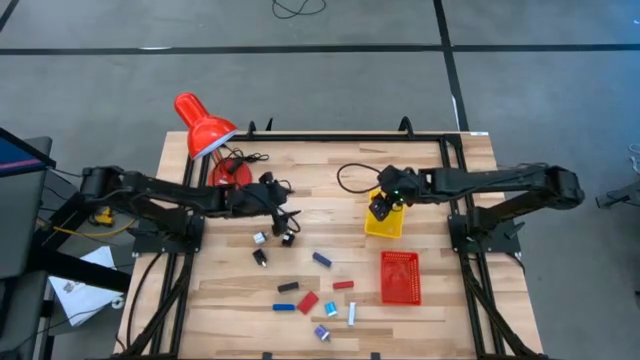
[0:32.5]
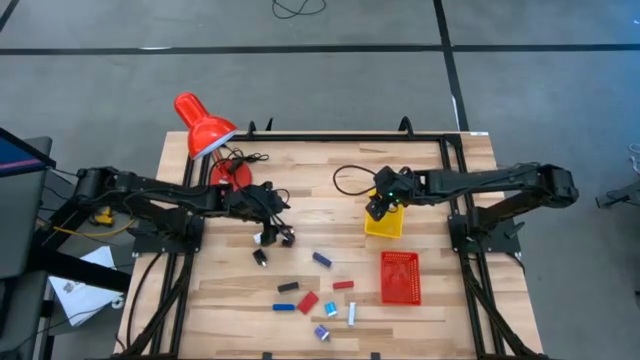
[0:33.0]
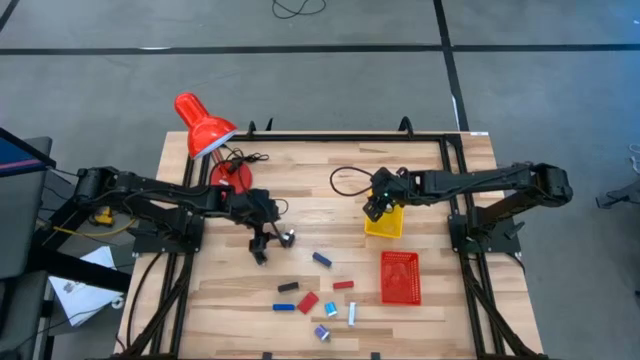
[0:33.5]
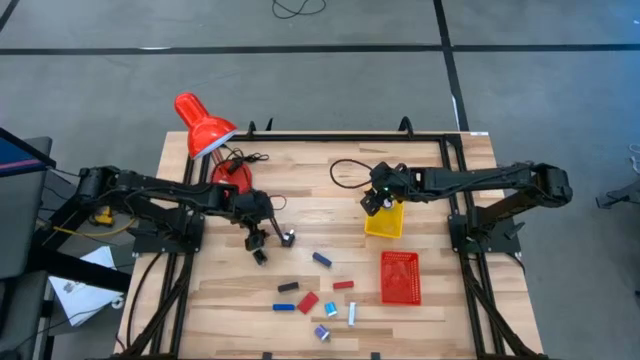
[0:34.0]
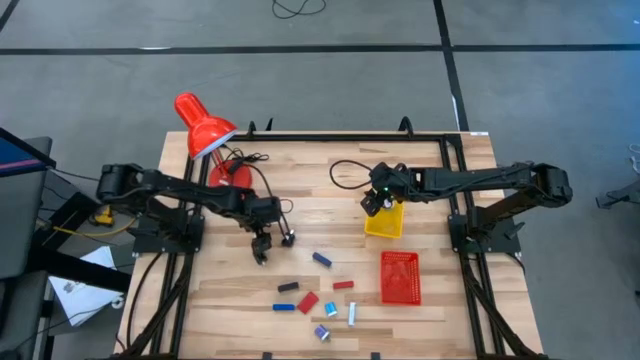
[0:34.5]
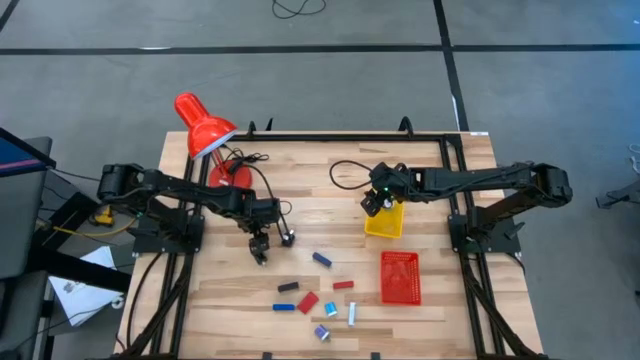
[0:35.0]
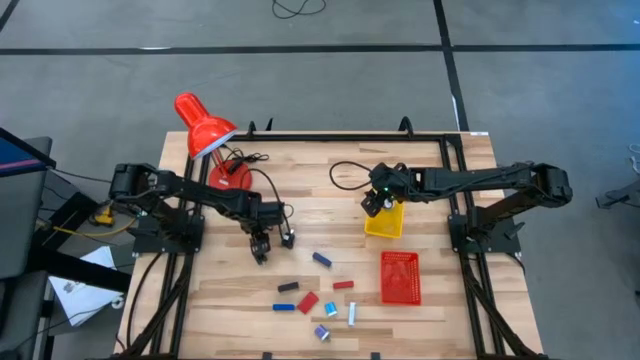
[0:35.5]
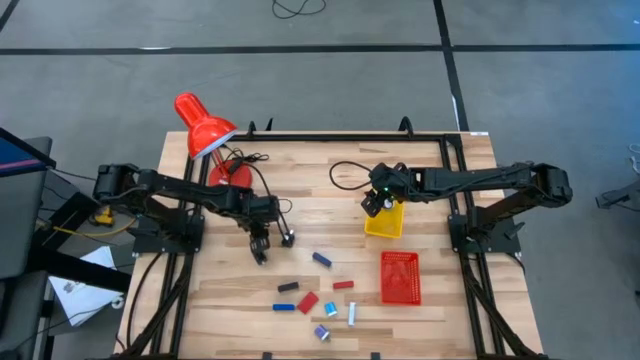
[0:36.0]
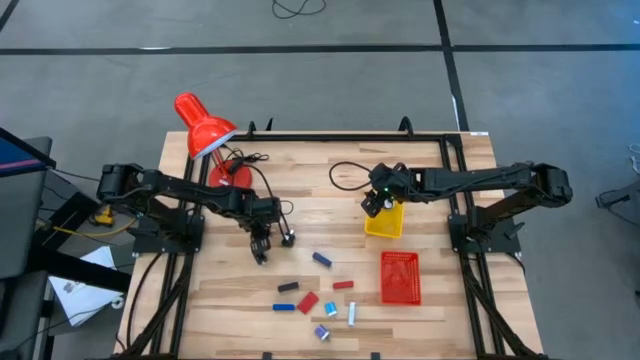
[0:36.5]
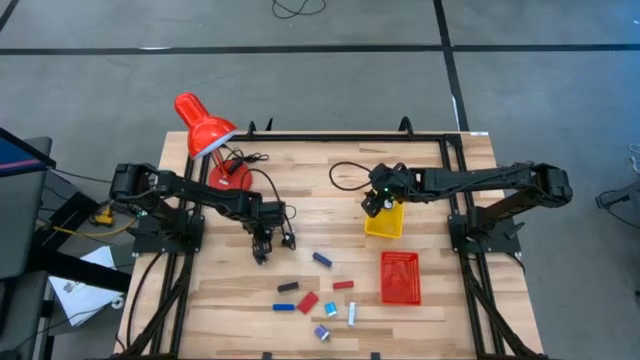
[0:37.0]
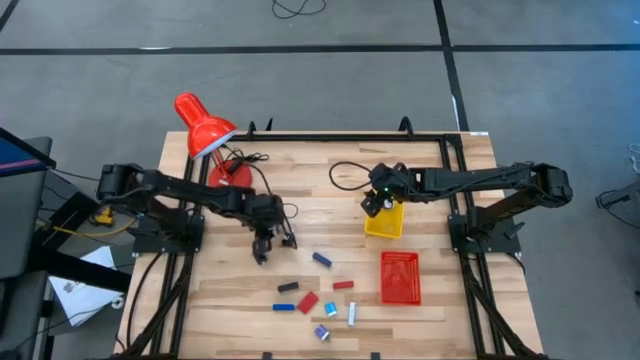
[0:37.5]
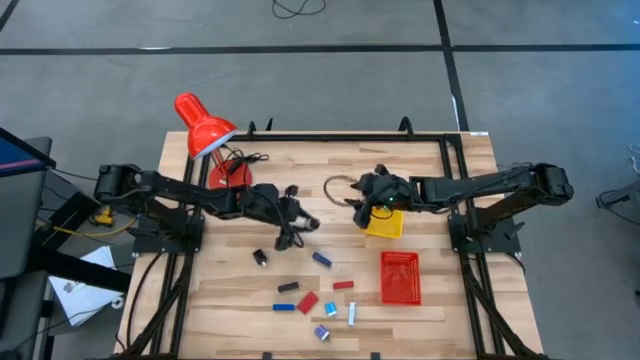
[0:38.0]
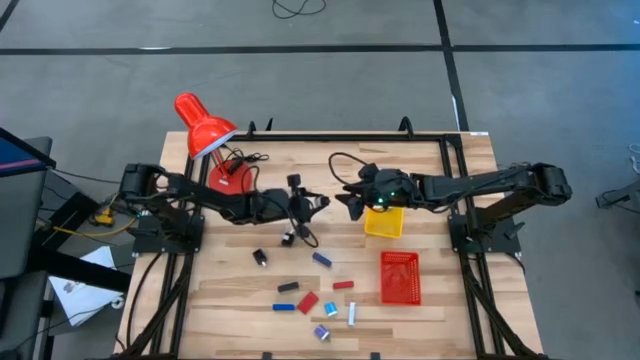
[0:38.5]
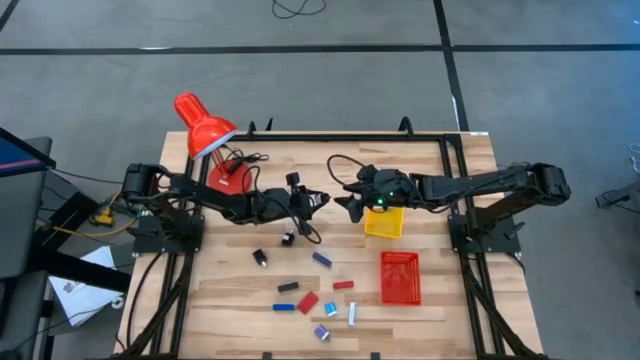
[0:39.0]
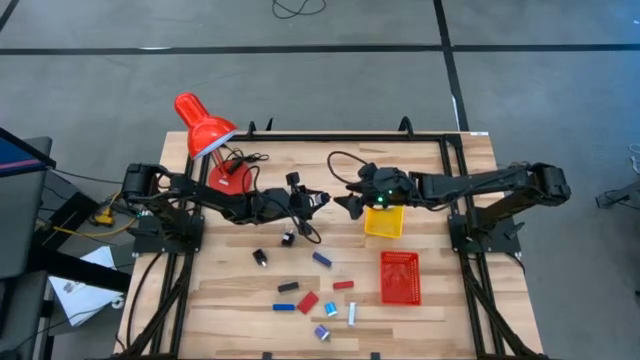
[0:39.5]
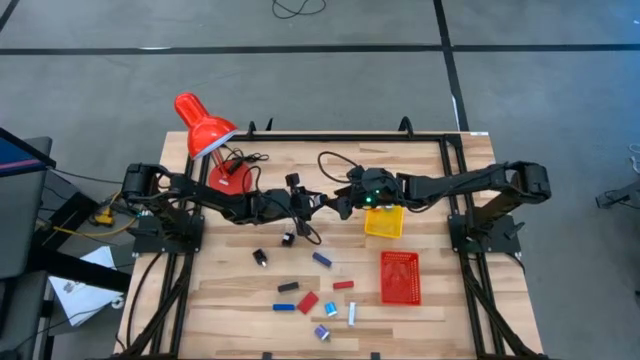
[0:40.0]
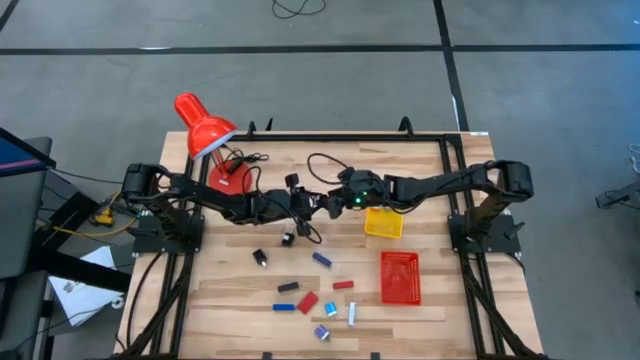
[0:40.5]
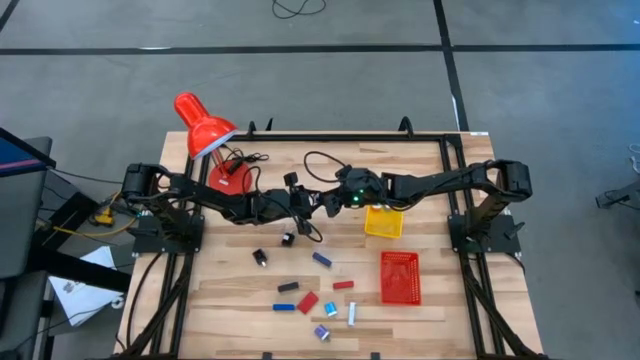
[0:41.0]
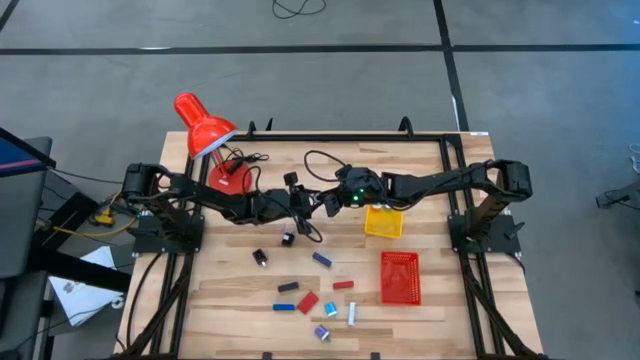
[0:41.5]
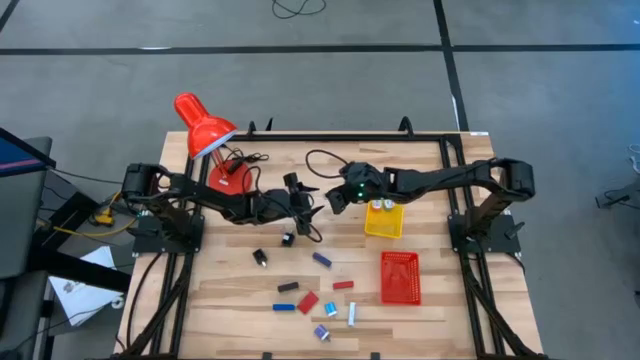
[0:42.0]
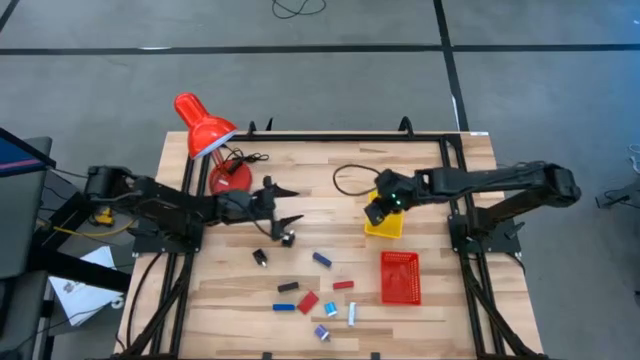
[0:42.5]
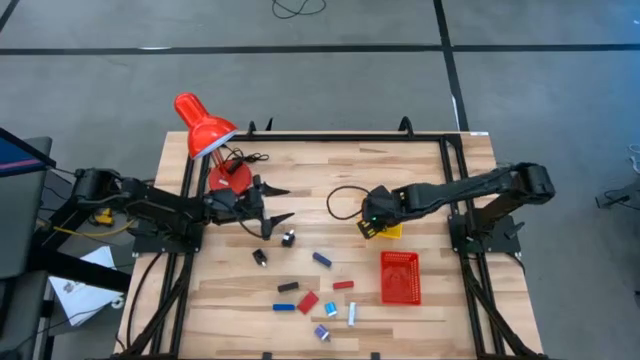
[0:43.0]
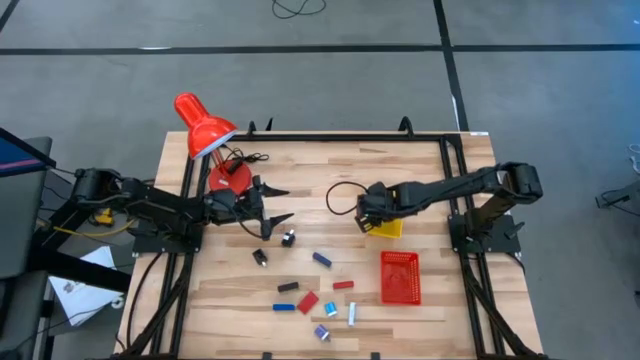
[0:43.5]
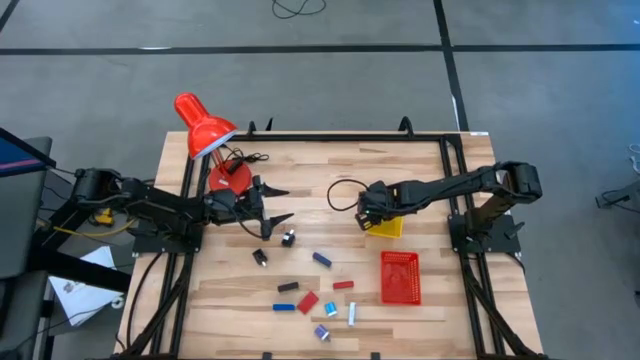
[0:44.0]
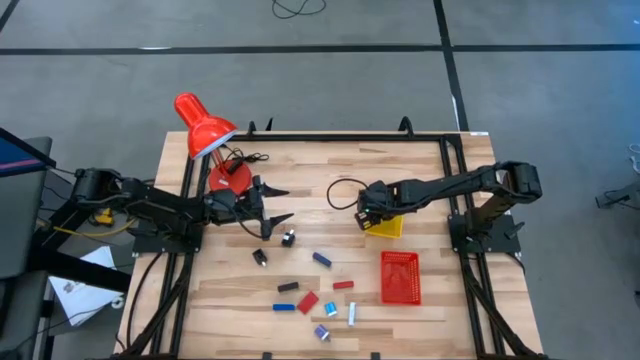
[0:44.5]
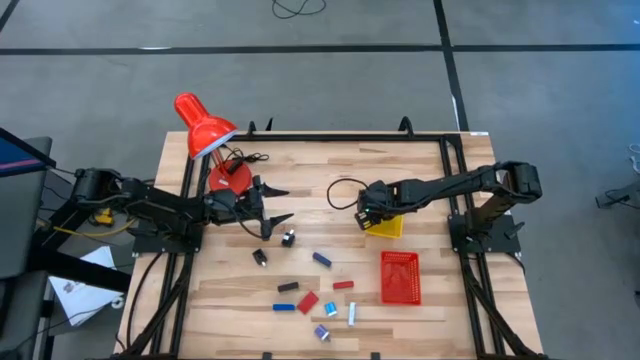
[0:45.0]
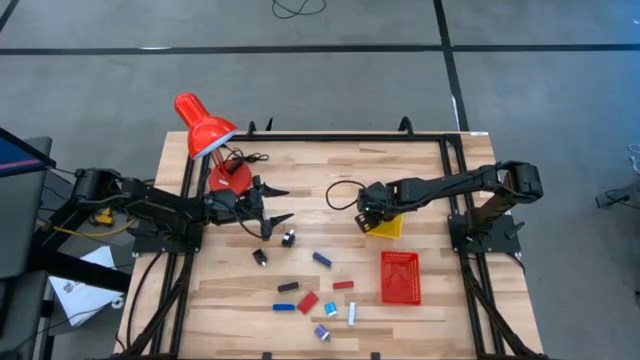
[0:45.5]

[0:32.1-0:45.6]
Task: Pick & Place Office items
Put the white charger adapter into the yellow bin

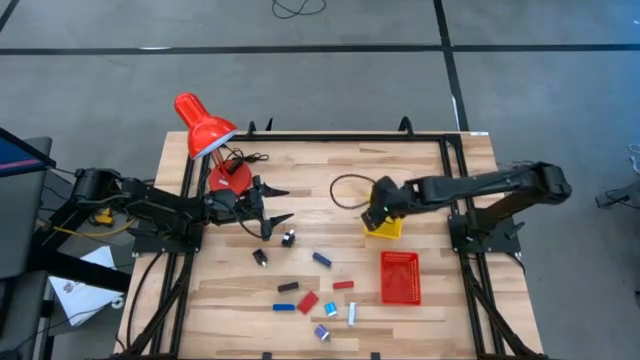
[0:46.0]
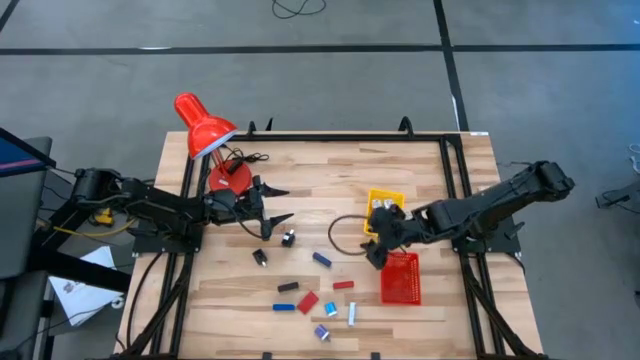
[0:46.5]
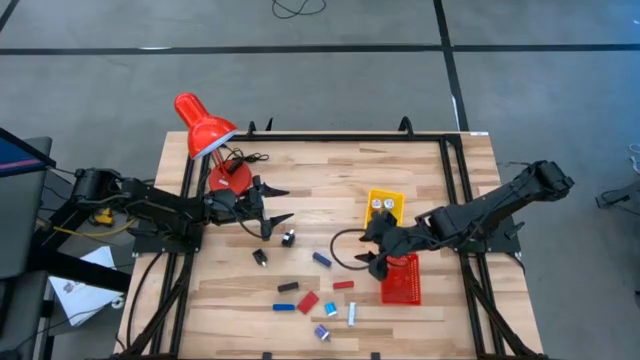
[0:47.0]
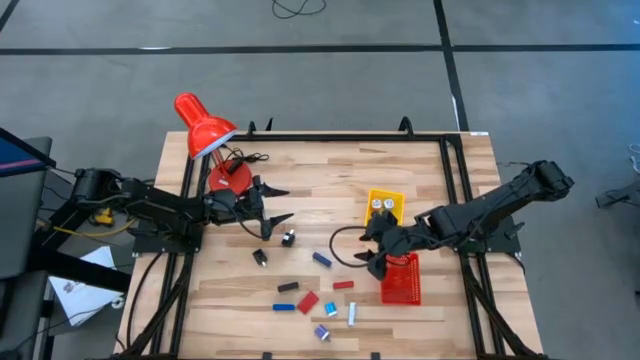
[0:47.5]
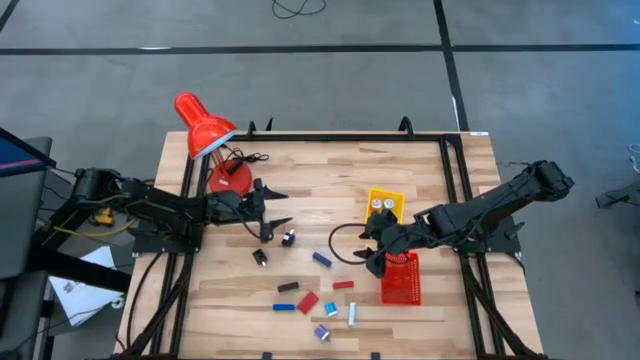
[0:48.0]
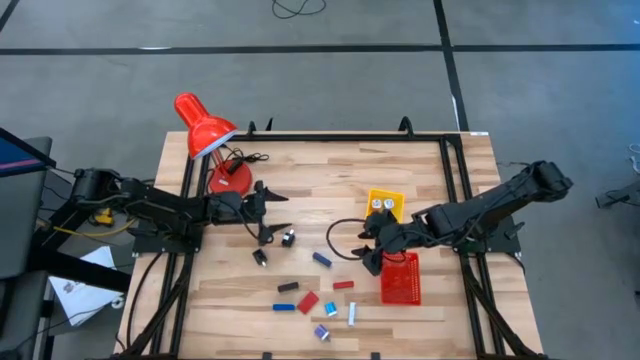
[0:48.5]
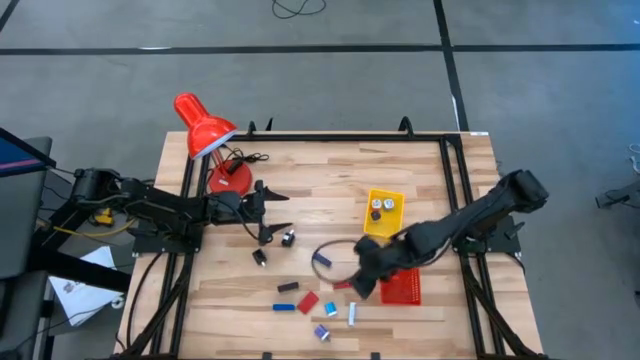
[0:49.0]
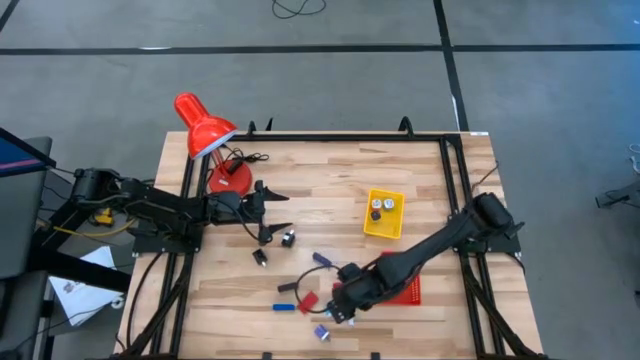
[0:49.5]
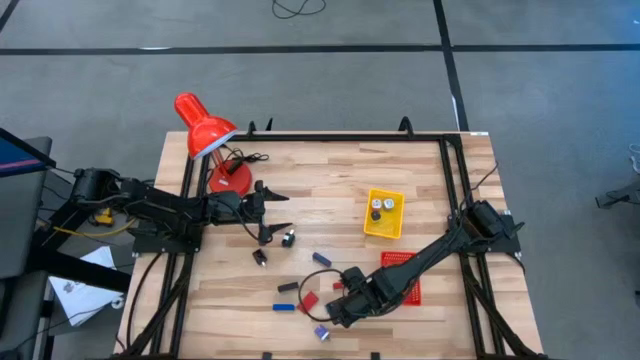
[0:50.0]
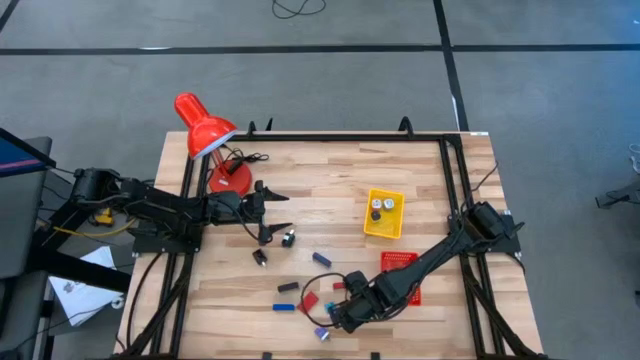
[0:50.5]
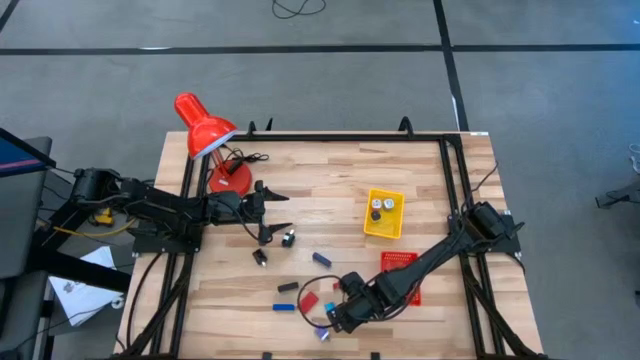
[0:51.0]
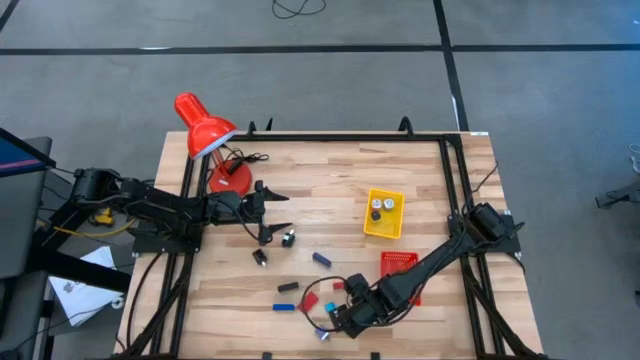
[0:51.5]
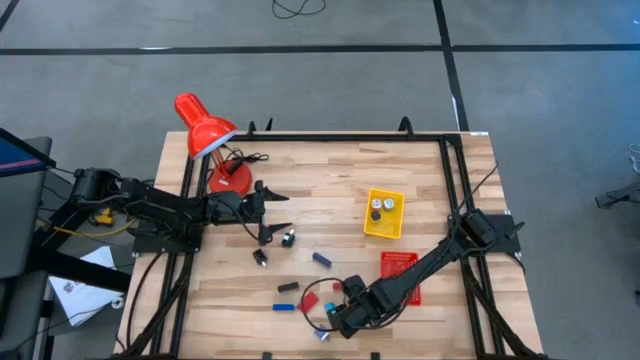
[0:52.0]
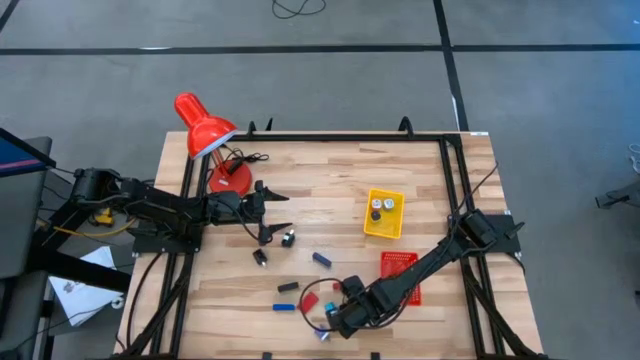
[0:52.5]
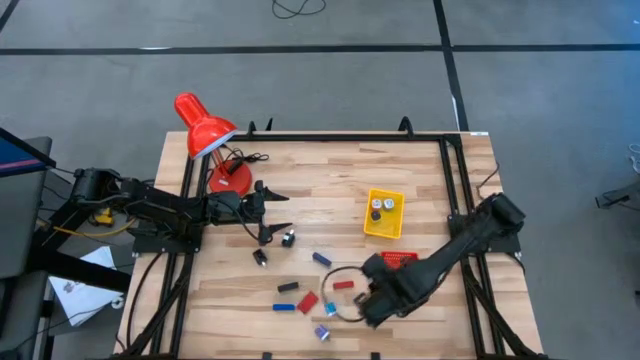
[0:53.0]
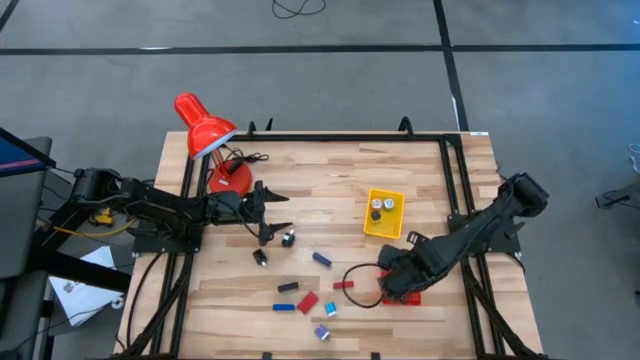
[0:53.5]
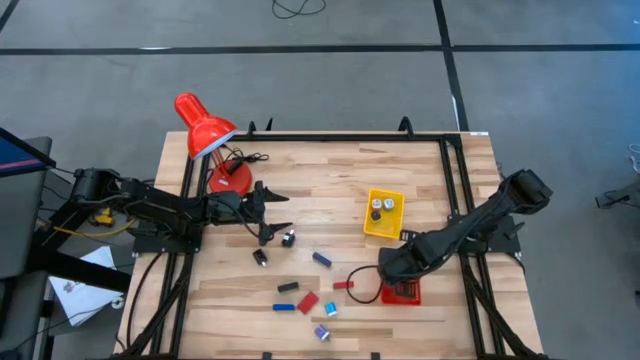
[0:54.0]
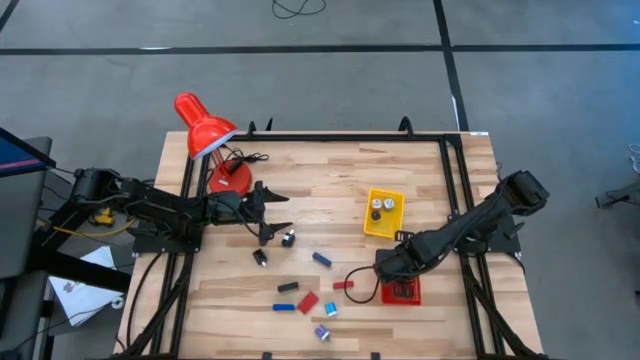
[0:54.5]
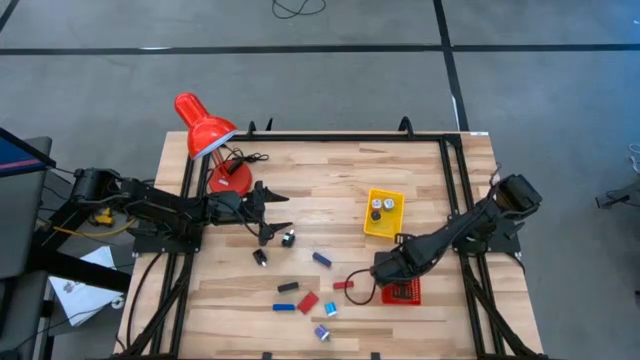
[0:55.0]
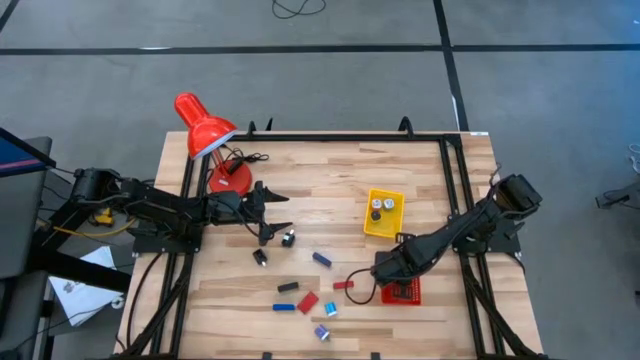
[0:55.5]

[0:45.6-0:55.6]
Put the white digital timer into the red bin
